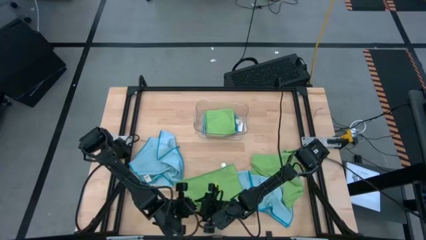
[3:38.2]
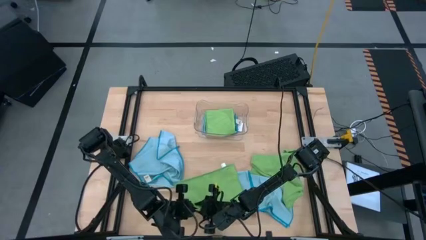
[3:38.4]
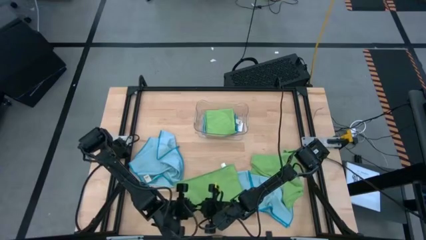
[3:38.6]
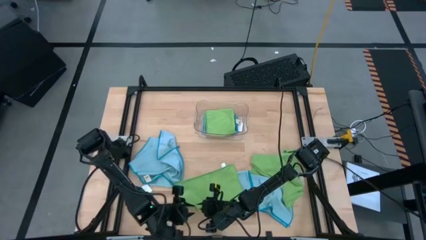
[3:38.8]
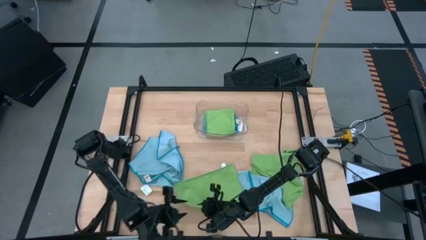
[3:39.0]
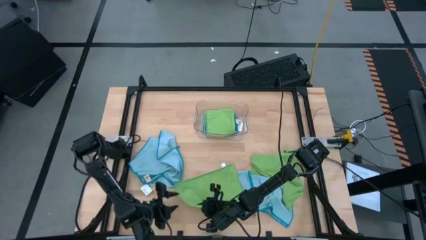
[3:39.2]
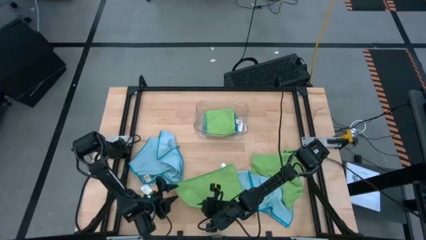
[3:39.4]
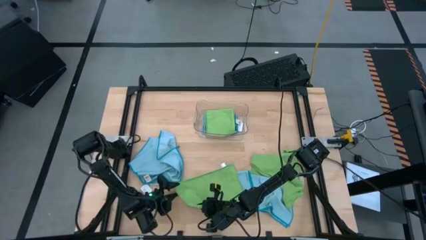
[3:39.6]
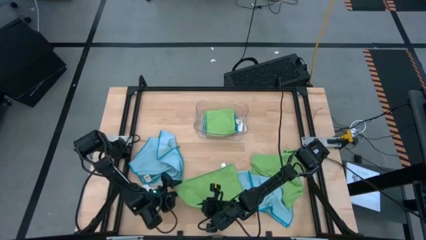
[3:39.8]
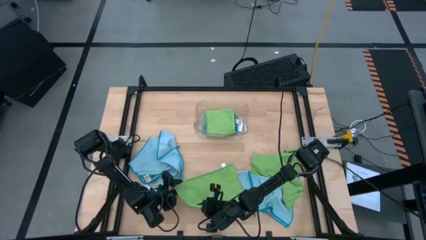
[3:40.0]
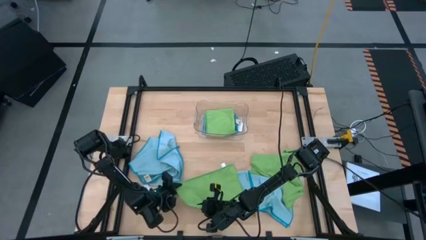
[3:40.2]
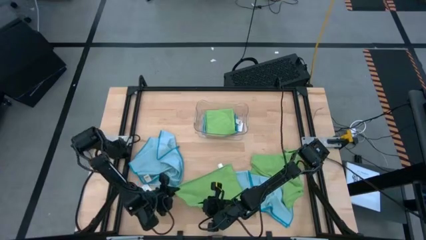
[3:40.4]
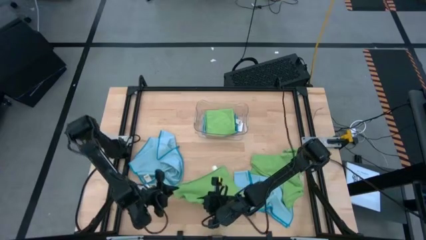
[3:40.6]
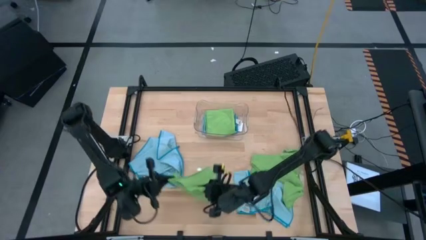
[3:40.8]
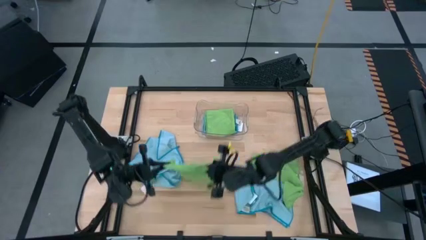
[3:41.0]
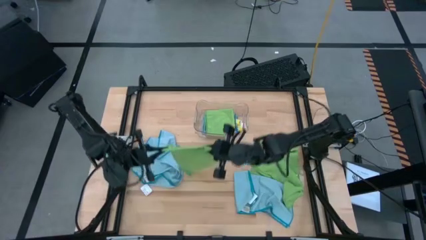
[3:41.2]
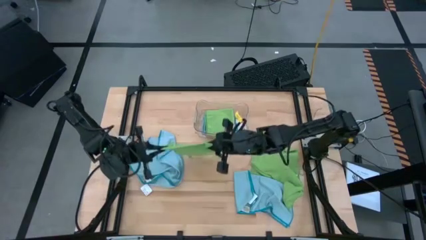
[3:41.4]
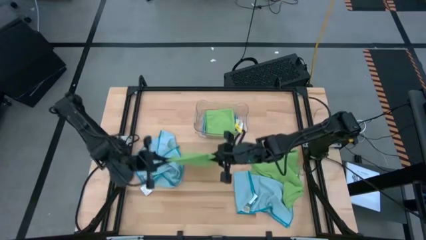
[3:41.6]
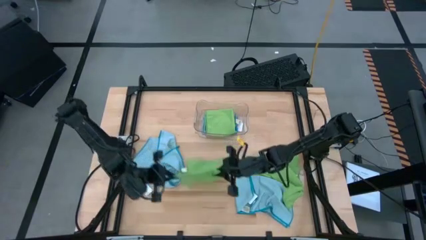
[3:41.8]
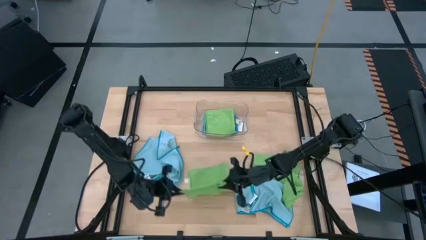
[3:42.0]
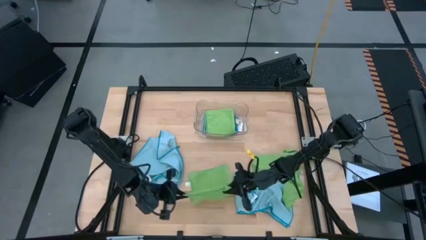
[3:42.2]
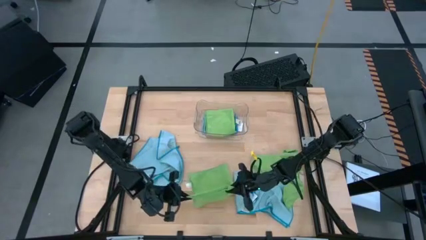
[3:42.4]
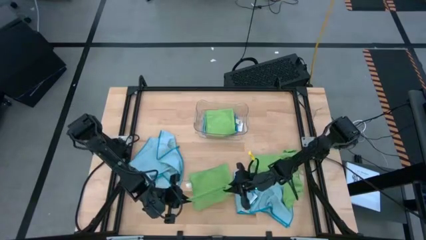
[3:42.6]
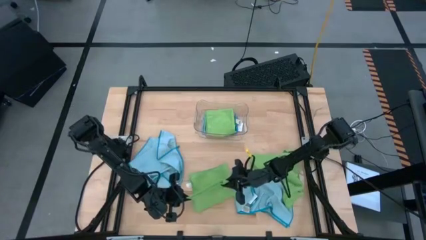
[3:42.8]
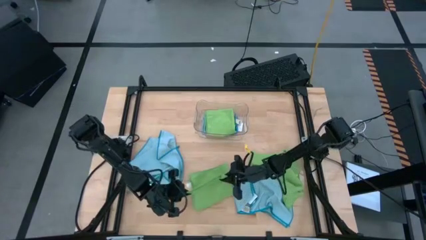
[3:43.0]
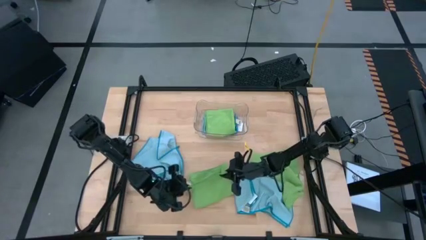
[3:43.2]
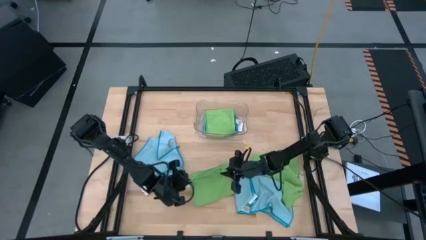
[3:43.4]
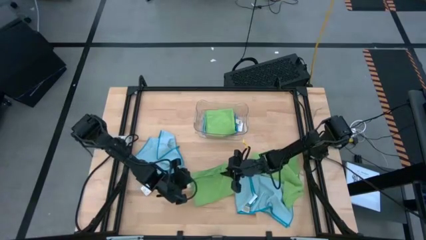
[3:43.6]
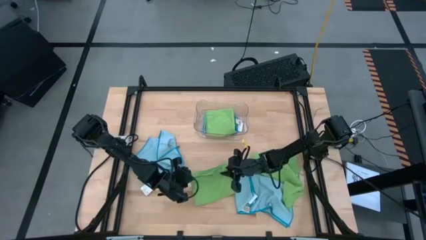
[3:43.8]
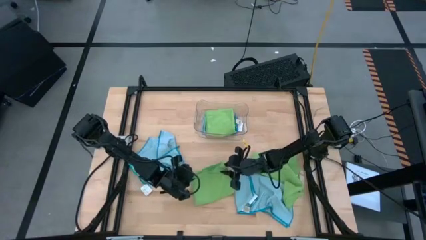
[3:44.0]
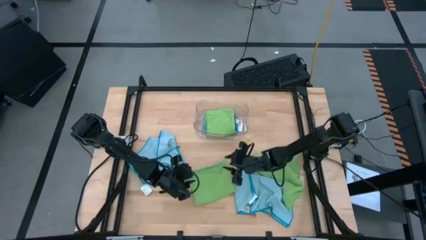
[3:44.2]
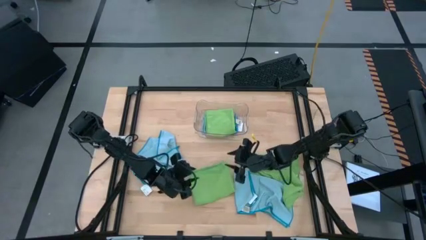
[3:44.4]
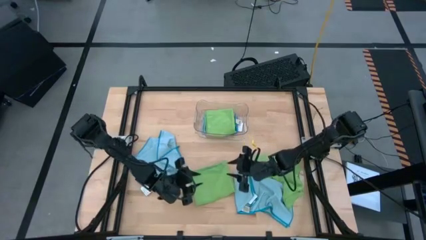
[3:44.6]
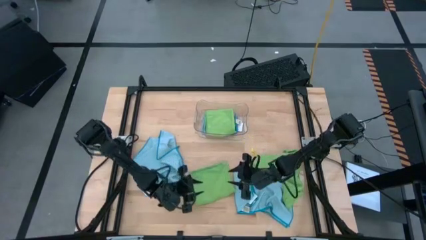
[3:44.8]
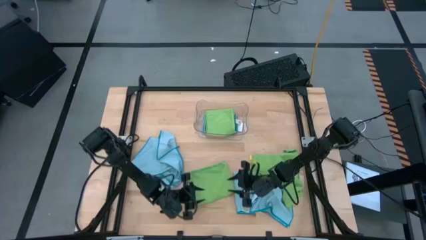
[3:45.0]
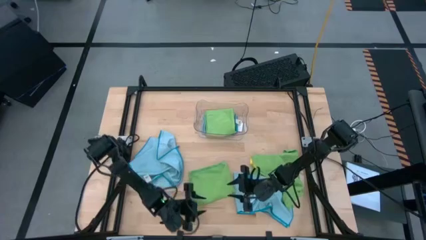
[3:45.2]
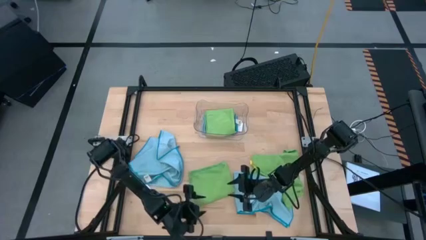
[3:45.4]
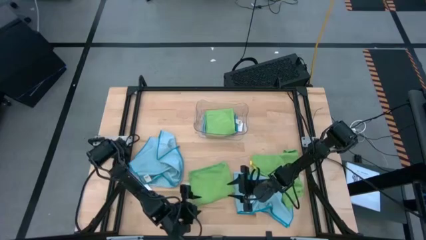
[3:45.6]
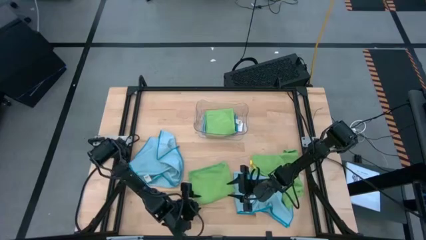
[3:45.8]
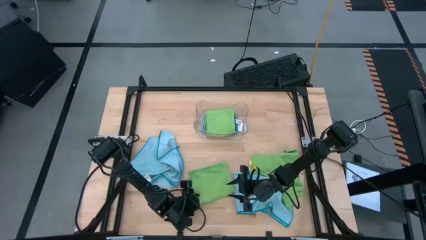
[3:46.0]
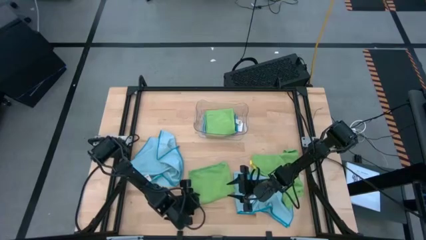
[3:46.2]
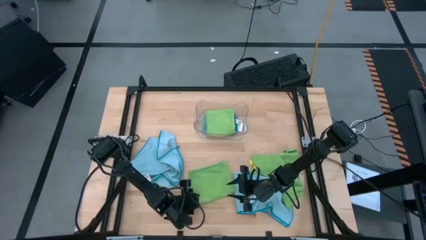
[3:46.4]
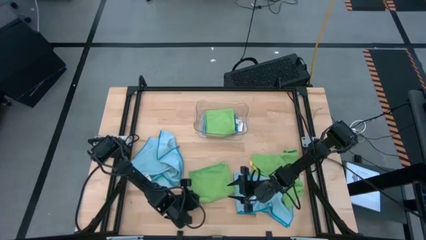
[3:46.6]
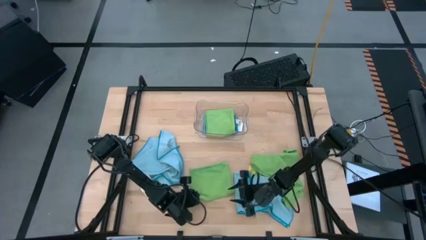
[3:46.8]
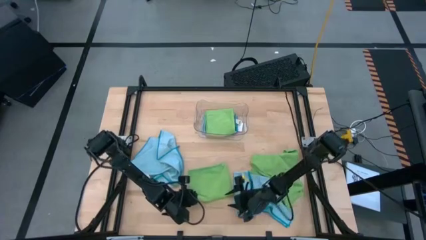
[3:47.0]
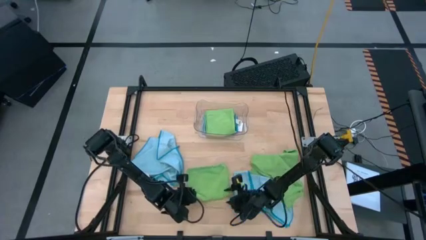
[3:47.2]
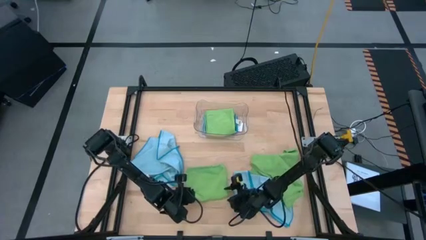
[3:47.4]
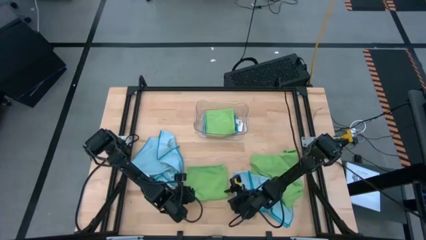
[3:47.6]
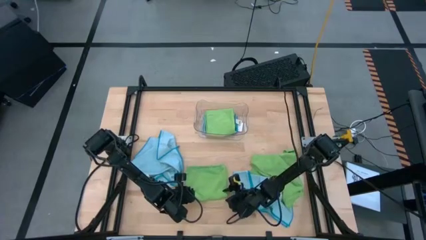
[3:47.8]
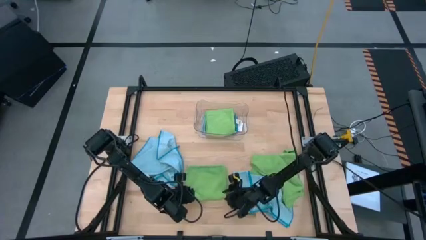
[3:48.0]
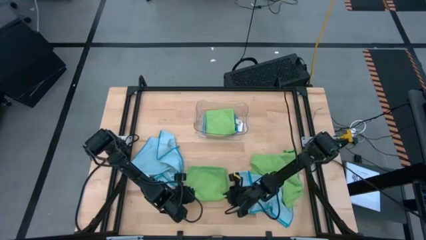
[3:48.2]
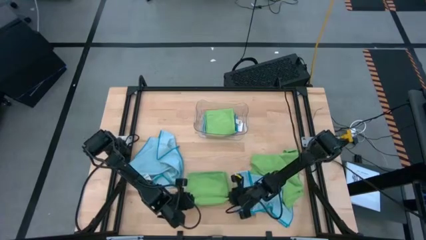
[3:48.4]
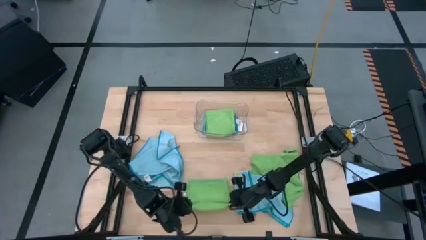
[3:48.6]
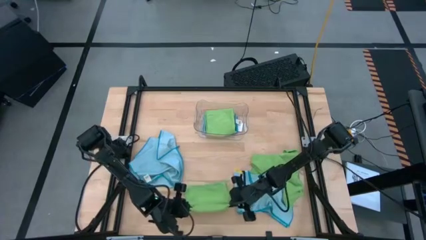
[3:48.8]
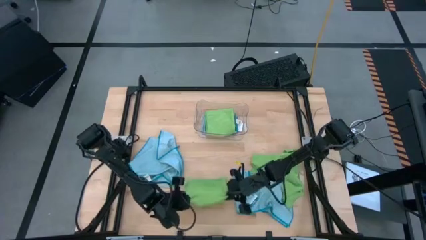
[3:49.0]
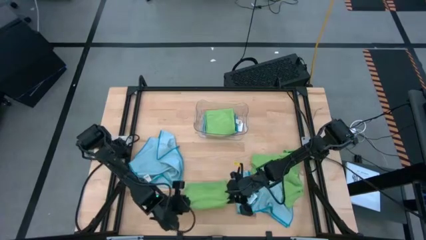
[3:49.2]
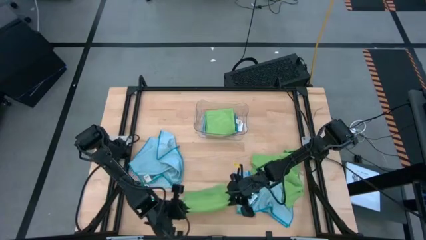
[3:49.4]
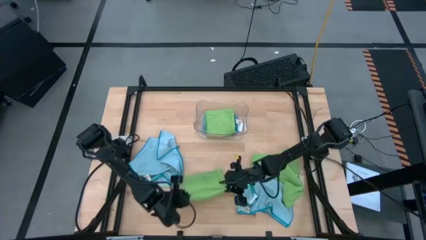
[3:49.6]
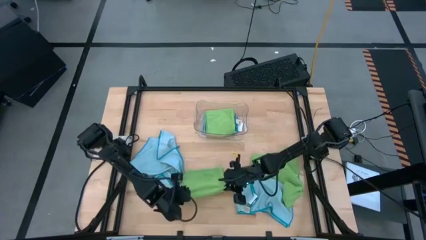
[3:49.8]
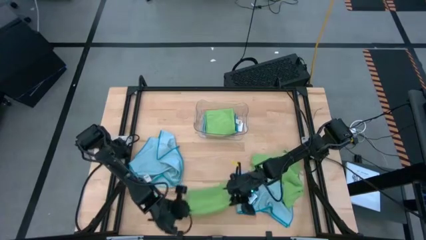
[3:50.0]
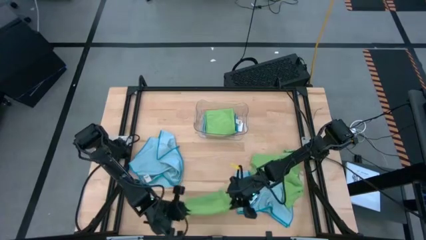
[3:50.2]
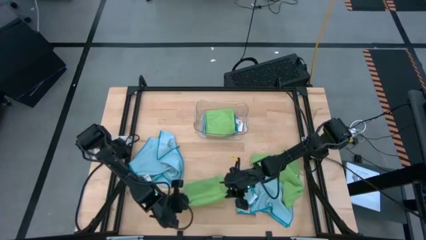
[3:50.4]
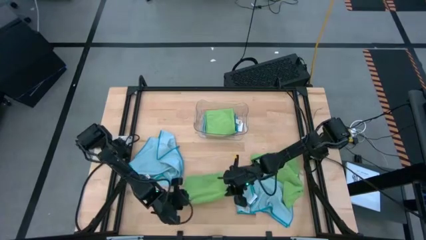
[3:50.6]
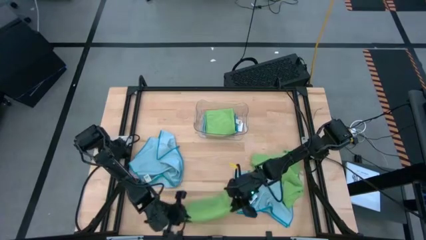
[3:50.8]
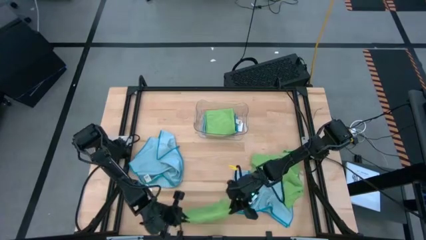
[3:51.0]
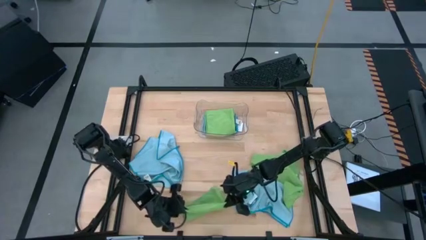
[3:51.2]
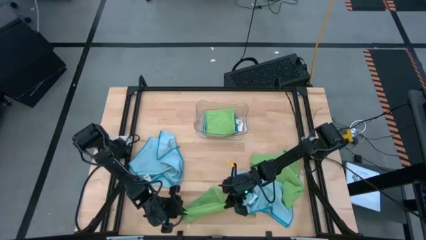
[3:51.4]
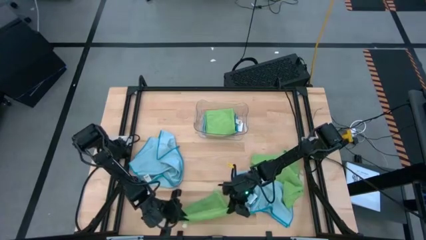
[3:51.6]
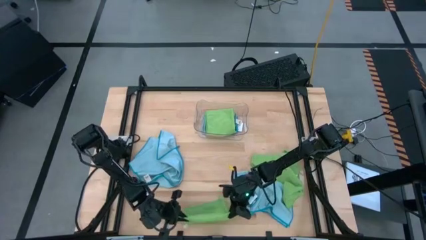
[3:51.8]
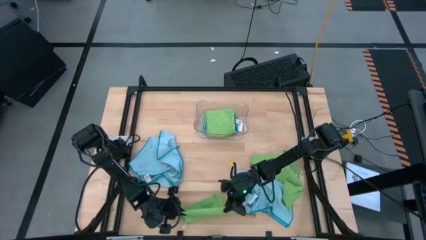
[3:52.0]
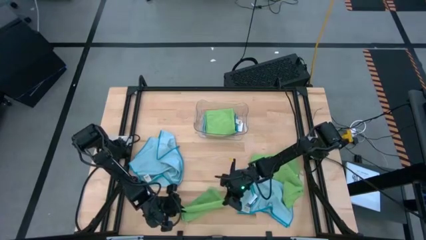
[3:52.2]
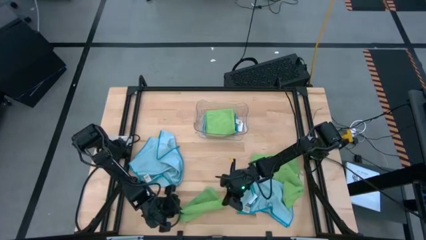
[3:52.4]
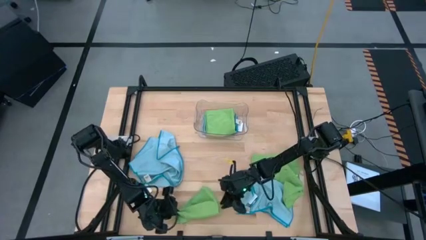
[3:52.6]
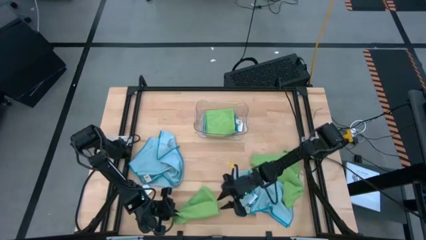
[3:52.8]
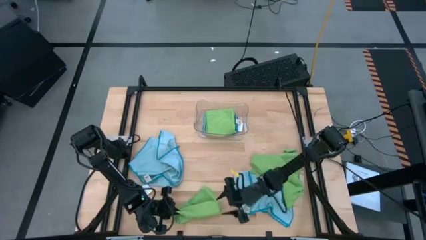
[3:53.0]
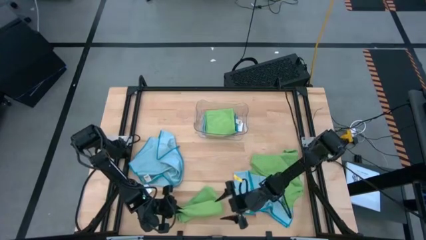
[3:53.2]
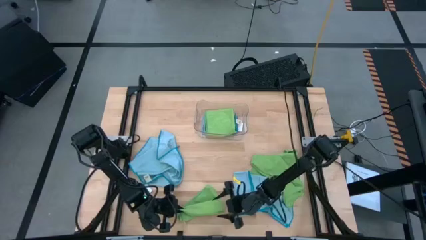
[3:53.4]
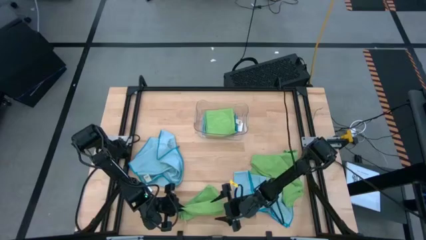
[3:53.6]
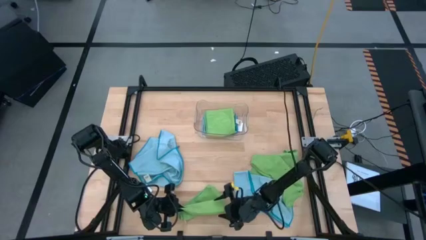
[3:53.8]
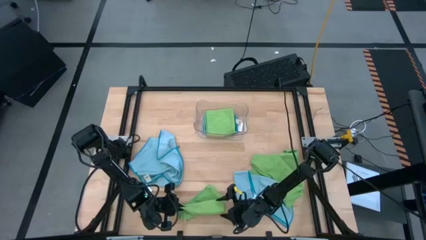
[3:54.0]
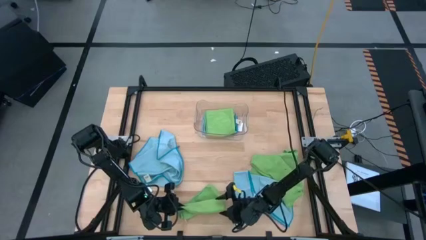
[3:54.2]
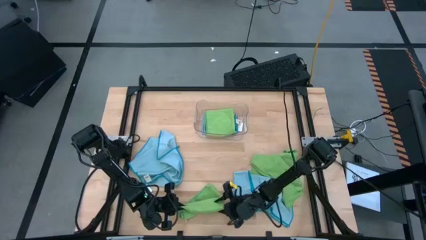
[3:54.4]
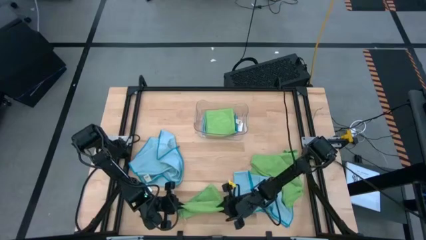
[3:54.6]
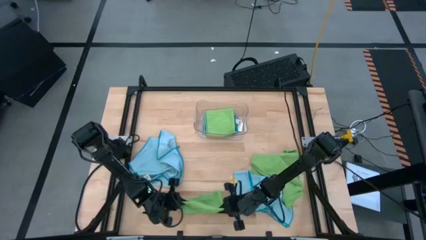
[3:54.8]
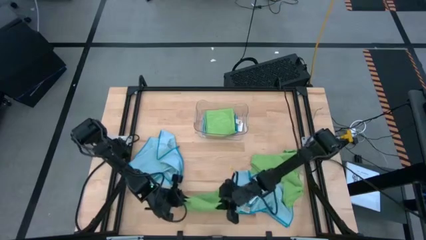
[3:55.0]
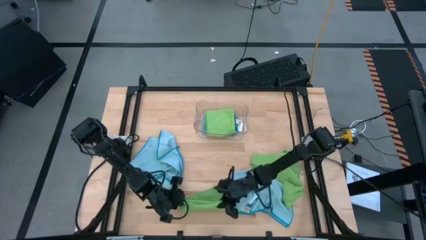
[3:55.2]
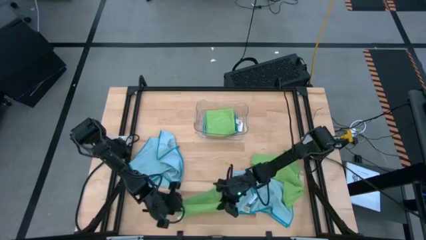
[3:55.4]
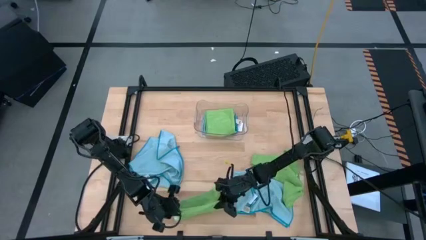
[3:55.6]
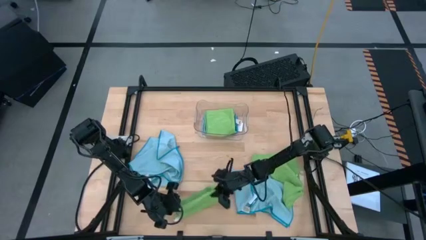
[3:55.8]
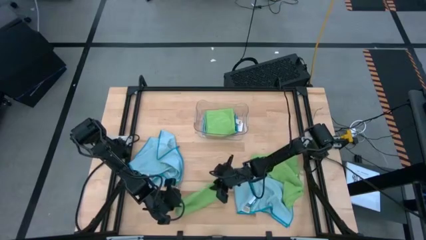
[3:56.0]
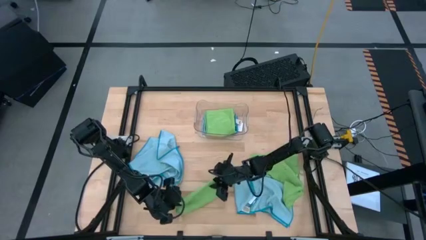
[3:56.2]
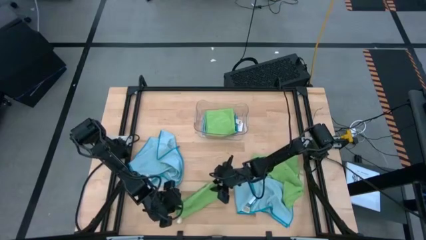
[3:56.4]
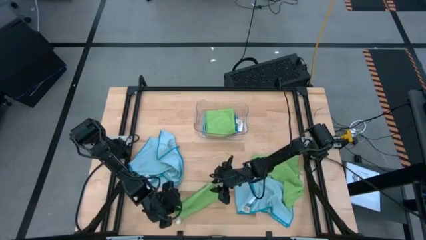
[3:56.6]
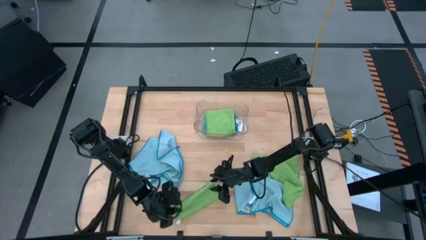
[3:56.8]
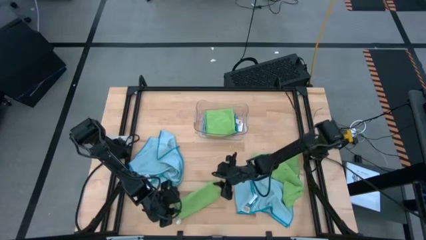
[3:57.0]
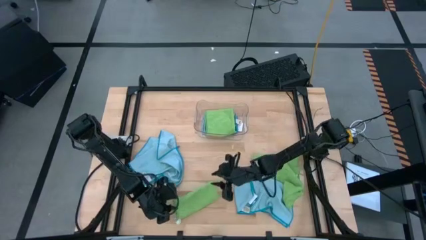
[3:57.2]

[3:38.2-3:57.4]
Task: Fold microfiber towels
Fold the left green microfiber cloth
